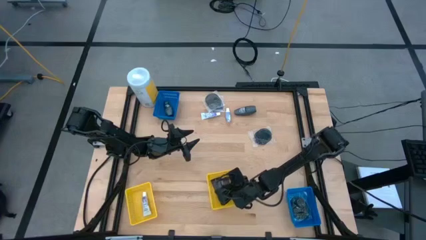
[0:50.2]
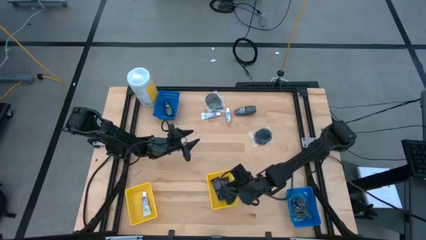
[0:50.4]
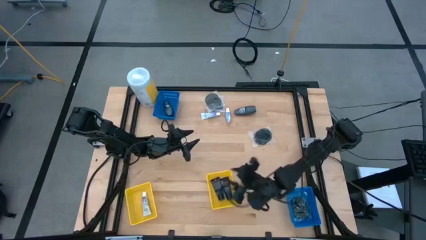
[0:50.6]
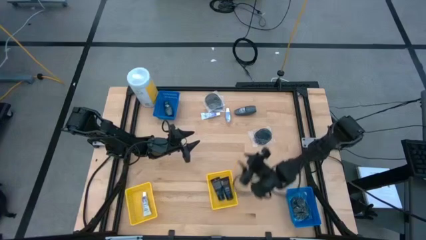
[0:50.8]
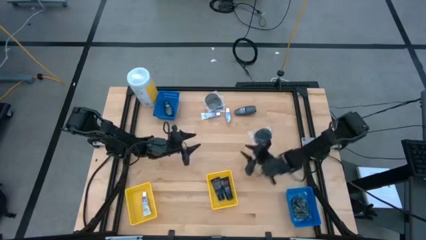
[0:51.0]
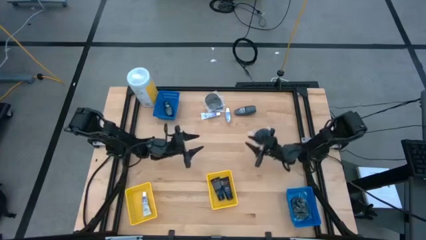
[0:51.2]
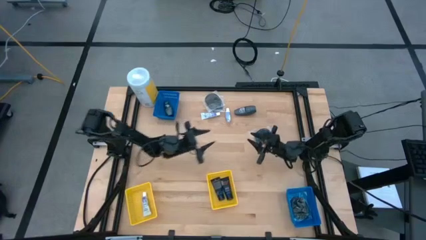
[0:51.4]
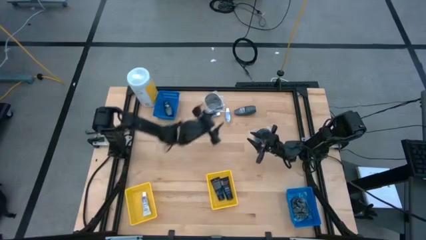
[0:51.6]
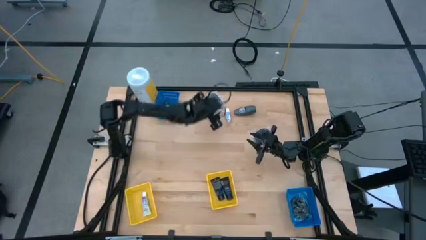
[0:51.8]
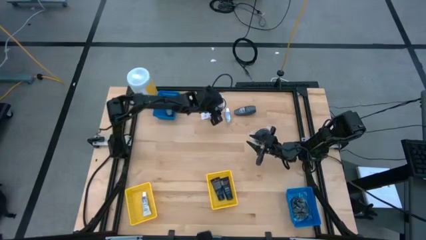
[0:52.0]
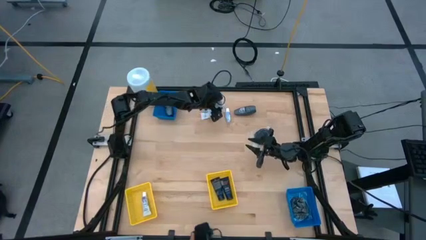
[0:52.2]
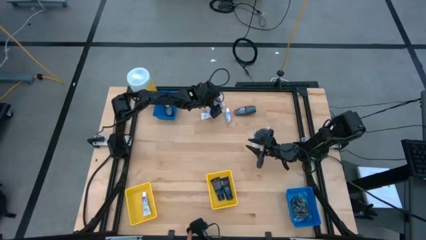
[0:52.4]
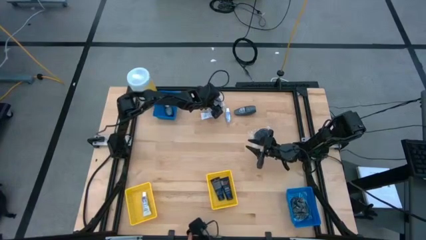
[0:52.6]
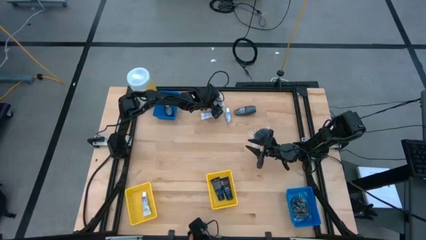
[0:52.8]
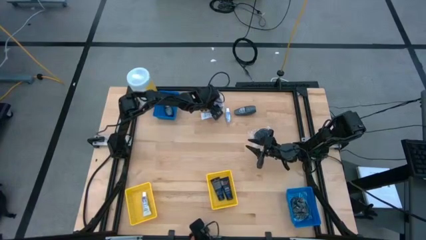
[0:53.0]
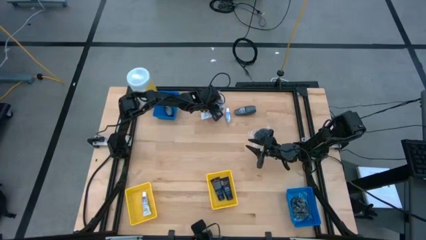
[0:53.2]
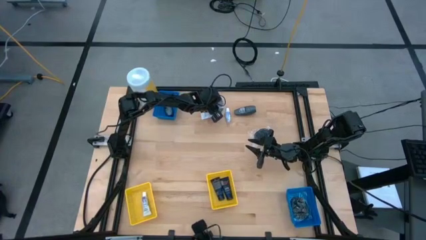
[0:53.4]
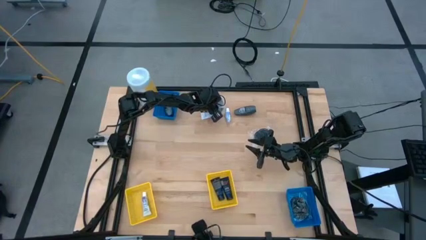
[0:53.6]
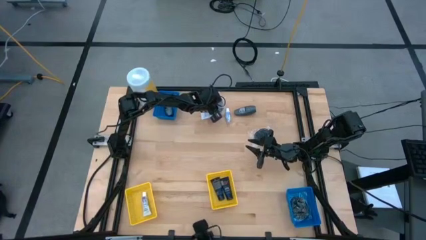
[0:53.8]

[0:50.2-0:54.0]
Task: Pick & Place Travel size toiletries
Put the black hairbrush into the bottom blue bin

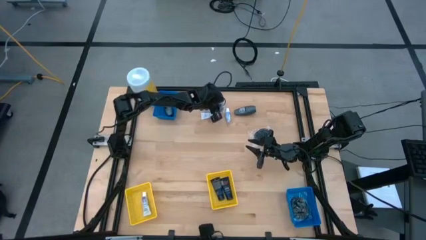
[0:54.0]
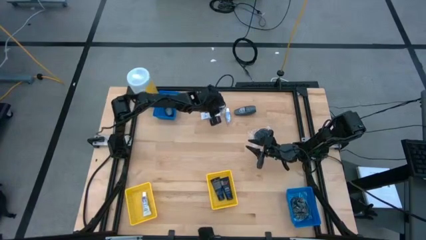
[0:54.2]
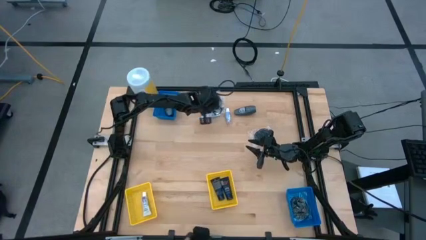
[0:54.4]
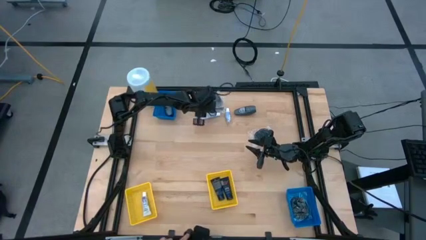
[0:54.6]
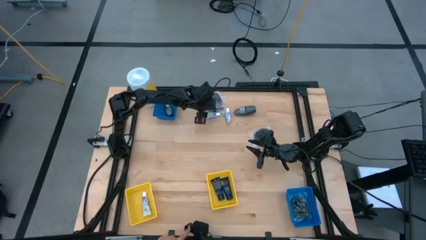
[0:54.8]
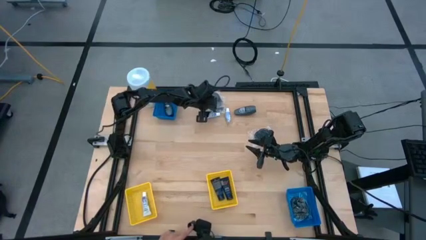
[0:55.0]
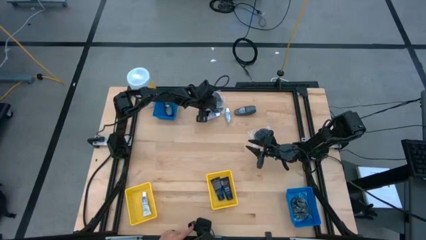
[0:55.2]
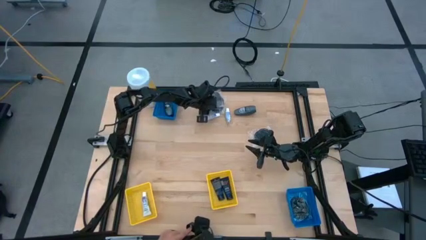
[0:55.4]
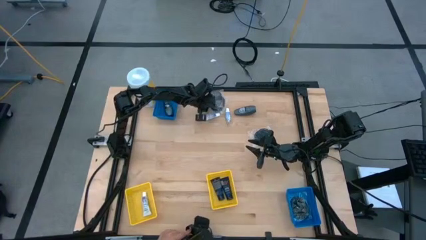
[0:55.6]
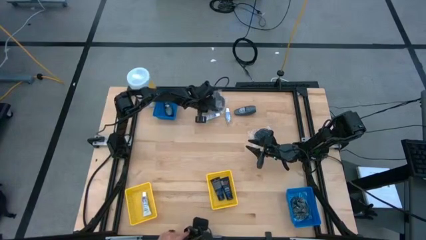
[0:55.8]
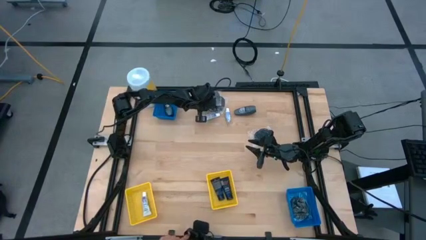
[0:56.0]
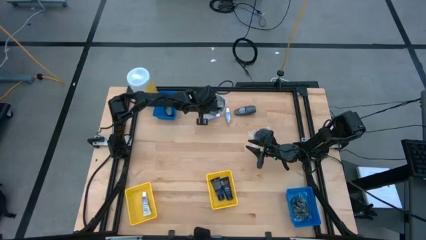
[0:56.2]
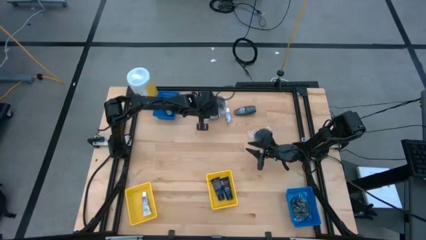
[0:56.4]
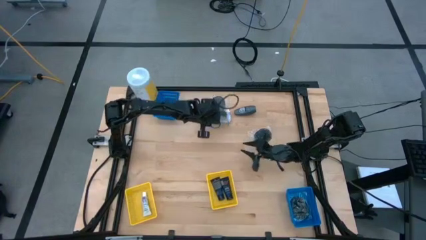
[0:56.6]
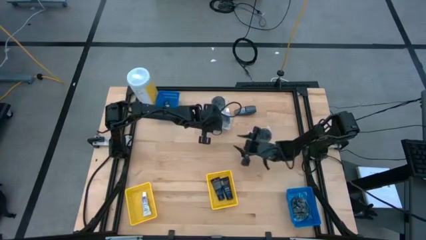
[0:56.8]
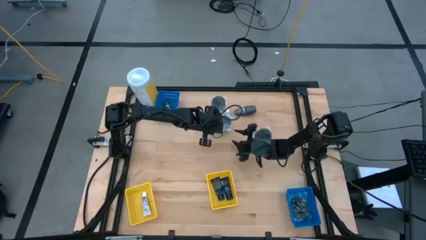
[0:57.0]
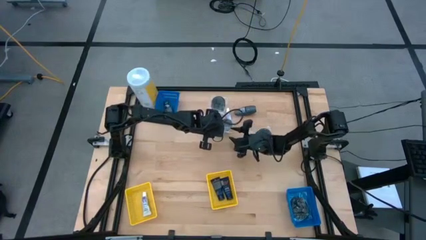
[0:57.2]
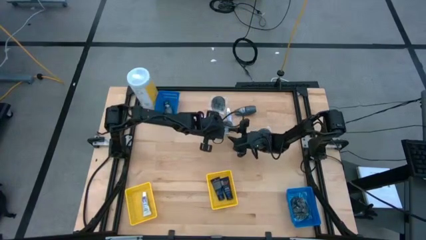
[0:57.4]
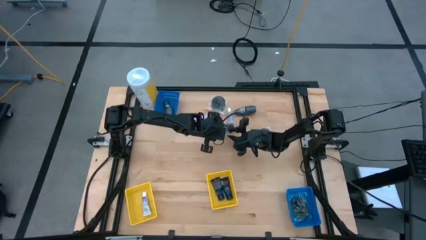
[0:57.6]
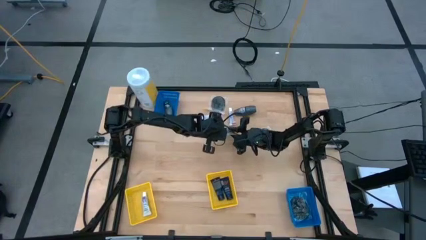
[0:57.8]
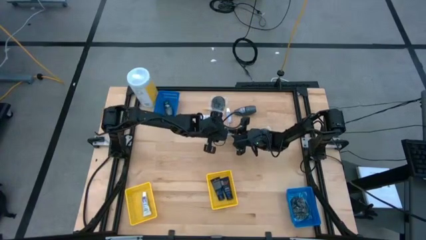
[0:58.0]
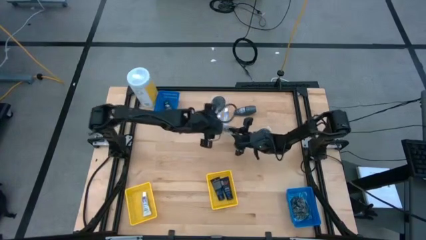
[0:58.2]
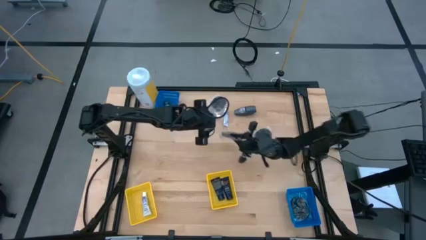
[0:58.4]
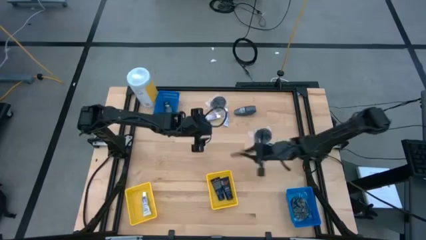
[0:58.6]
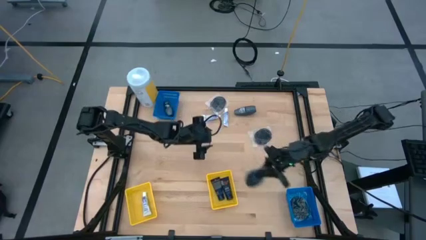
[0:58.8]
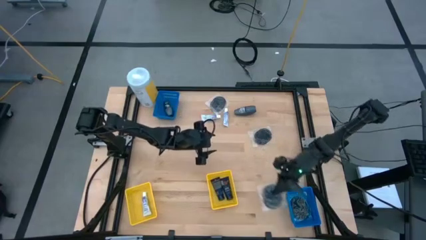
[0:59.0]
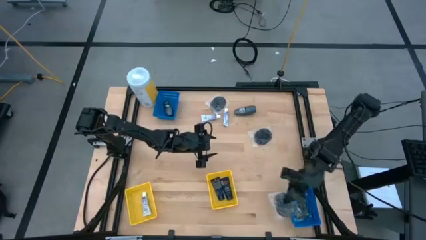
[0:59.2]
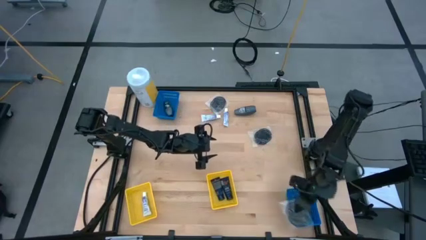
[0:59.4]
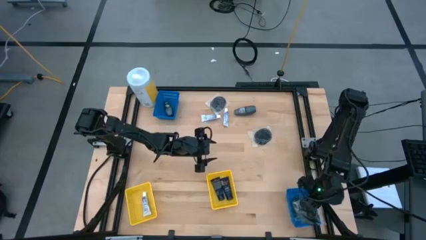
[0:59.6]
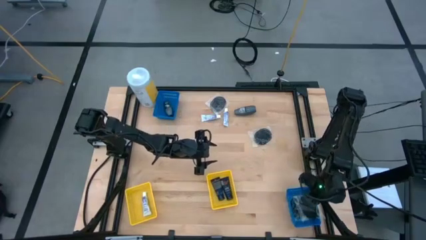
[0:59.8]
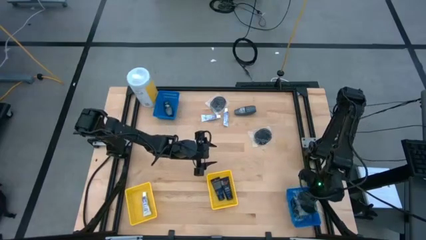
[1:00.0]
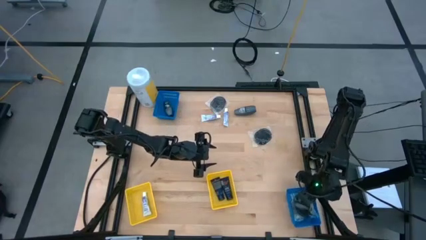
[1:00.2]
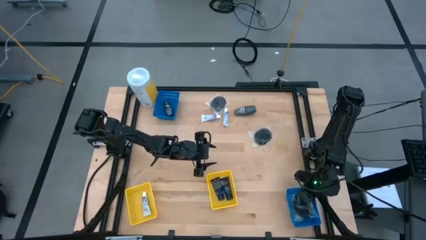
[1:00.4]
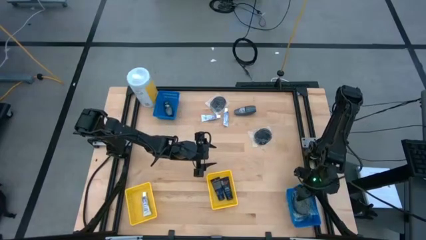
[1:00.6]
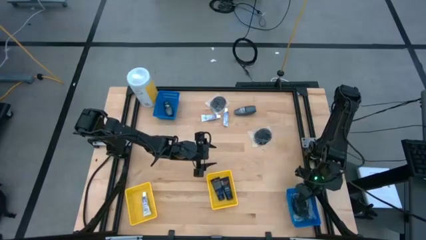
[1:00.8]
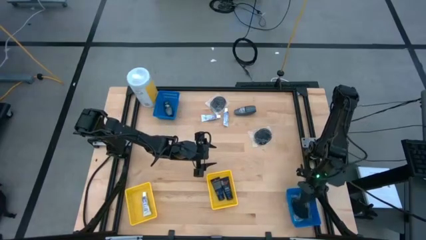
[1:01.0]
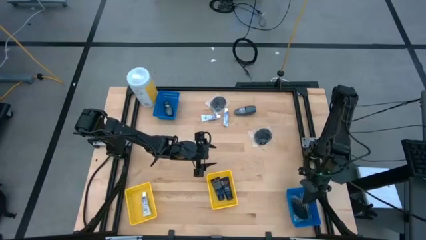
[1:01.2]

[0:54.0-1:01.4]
Put the black hairbrush into the bottom blue bin

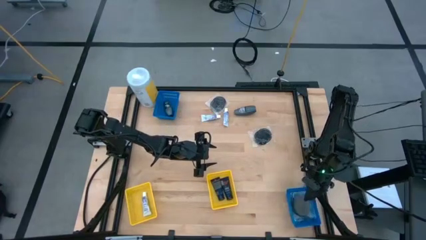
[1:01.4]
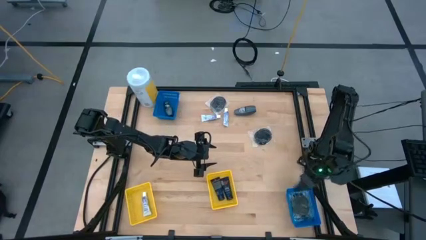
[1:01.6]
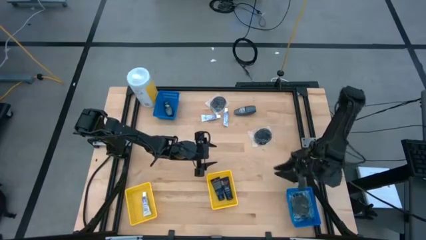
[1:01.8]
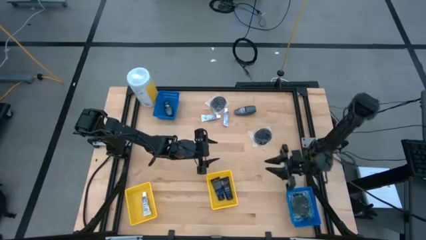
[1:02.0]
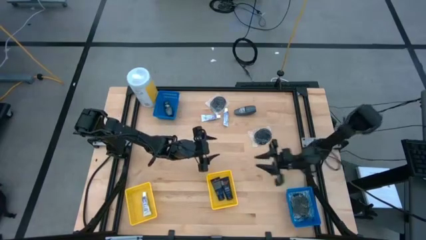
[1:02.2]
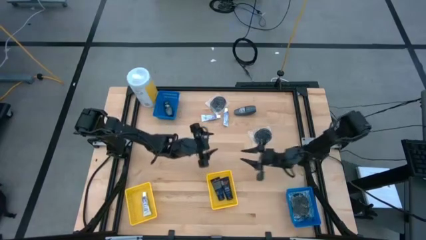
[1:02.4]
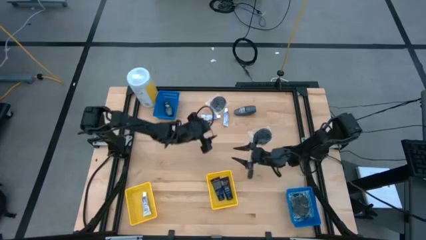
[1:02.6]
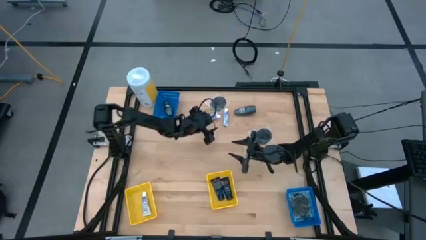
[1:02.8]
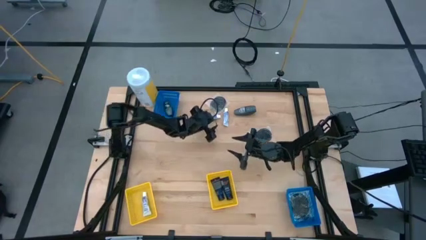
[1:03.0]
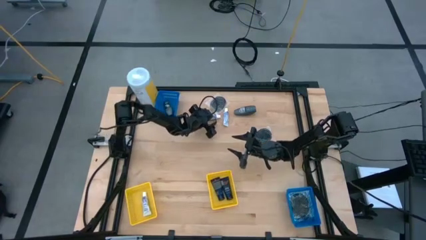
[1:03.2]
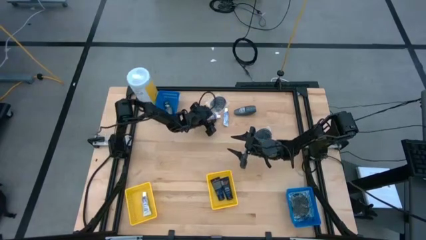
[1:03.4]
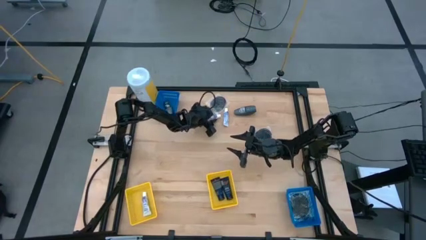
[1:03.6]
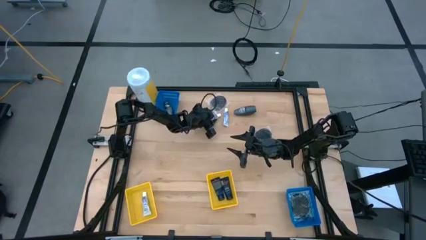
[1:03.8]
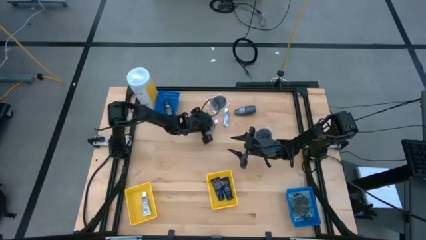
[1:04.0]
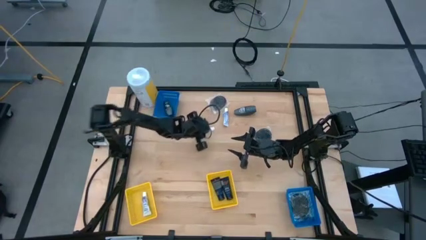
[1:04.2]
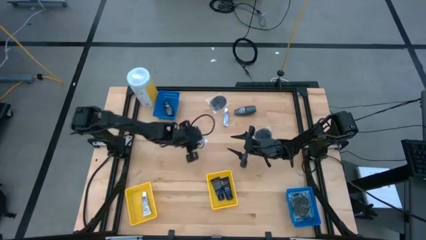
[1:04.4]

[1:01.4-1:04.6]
Put the white toothpaste into the left yellow bin

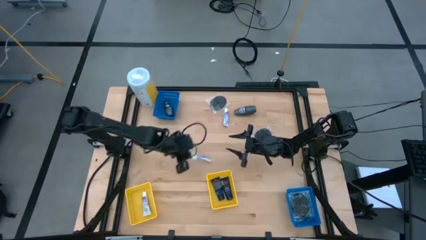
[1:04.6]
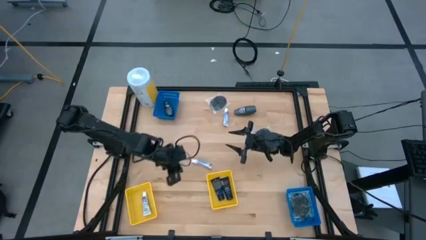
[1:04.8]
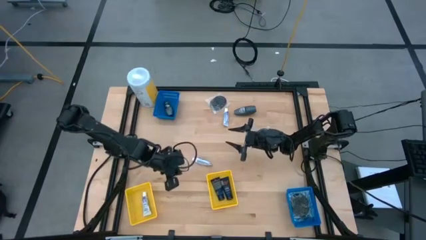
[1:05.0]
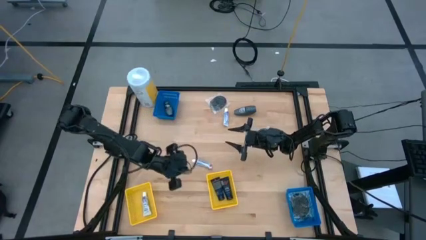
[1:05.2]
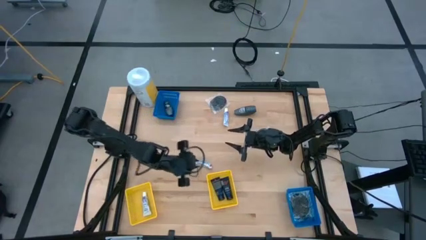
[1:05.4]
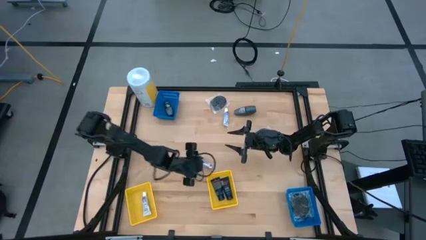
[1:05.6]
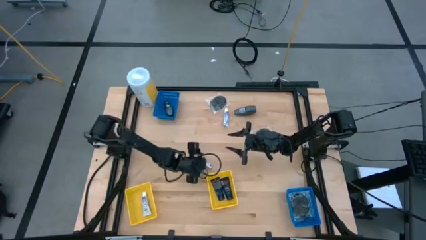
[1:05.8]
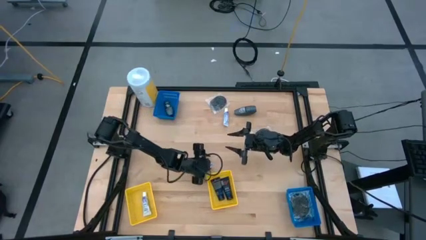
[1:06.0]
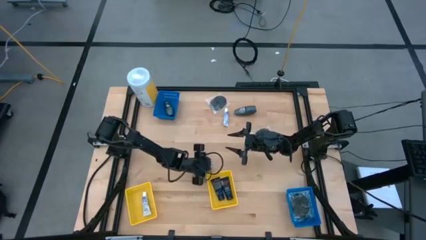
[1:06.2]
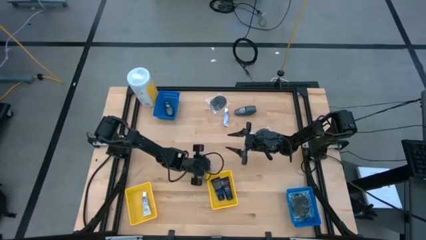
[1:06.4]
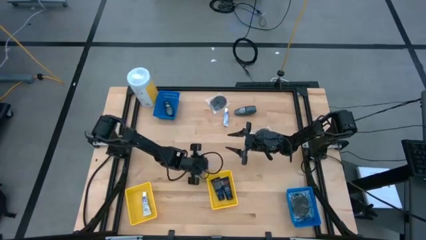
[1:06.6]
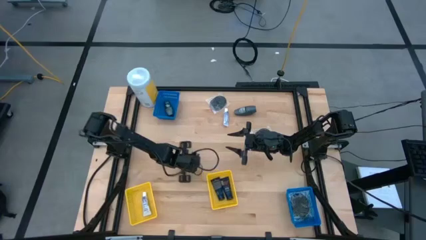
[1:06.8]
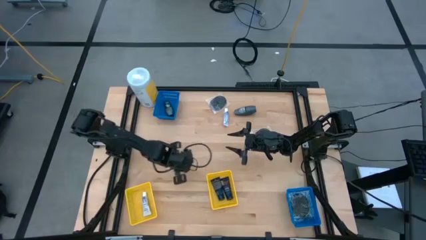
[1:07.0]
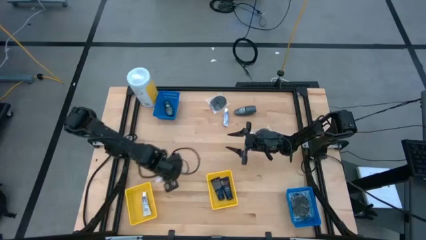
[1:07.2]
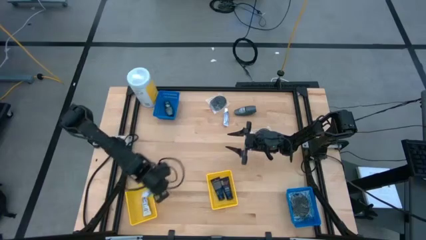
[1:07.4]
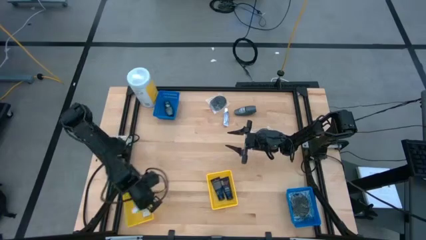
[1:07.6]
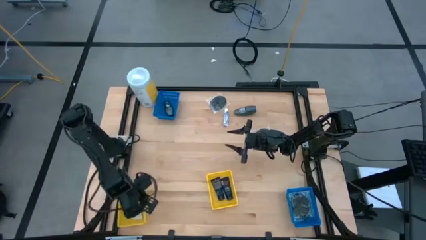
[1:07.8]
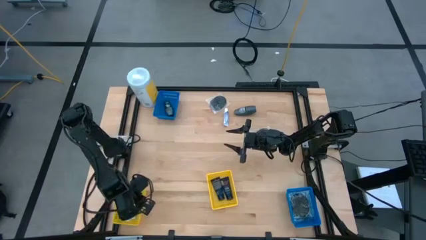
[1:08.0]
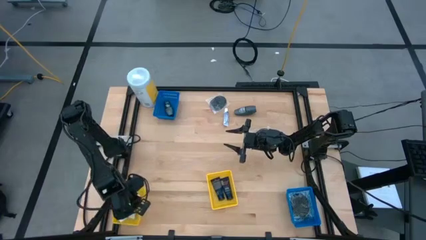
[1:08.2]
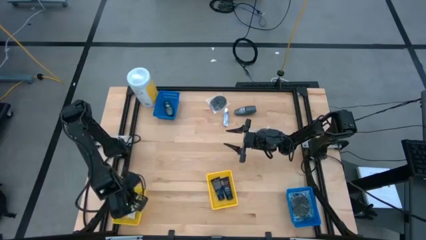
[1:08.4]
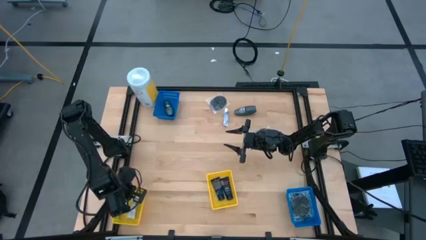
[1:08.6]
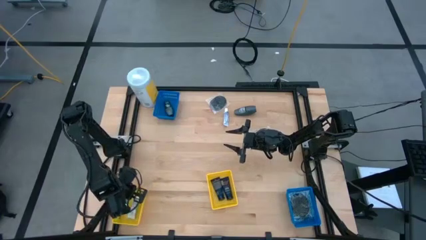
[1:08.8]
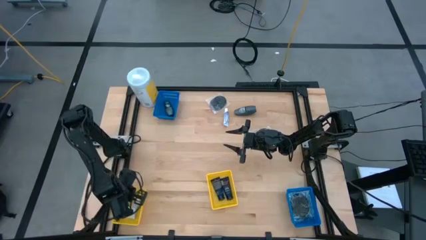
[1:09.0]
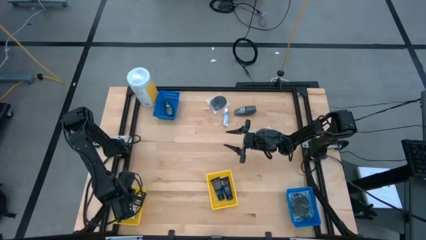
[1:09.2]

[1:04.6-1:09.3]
Put the white toothpaste into the left yellow bin
